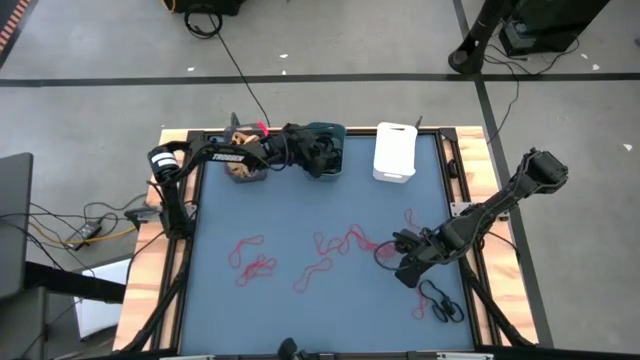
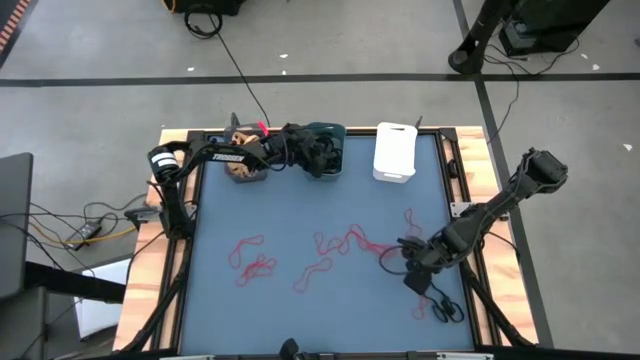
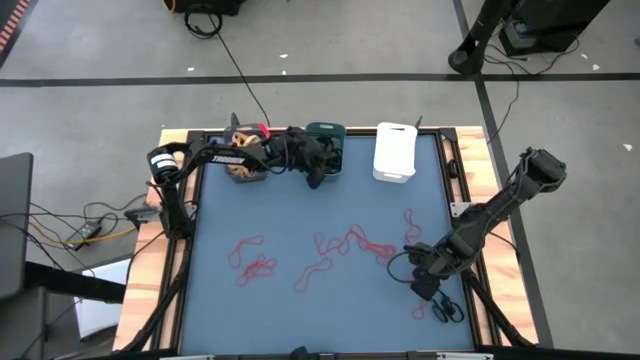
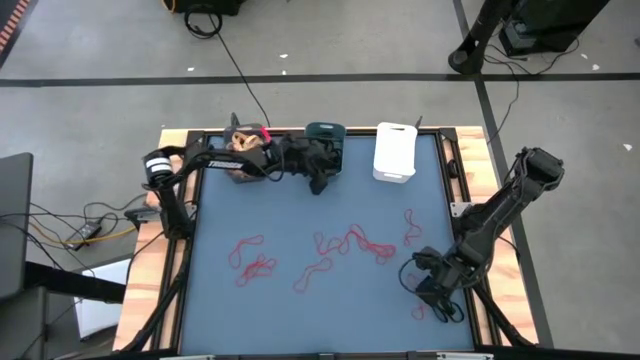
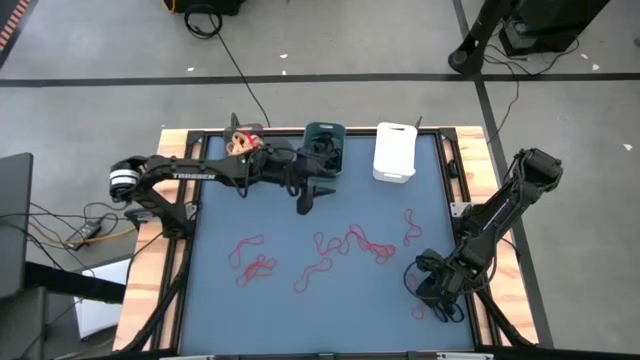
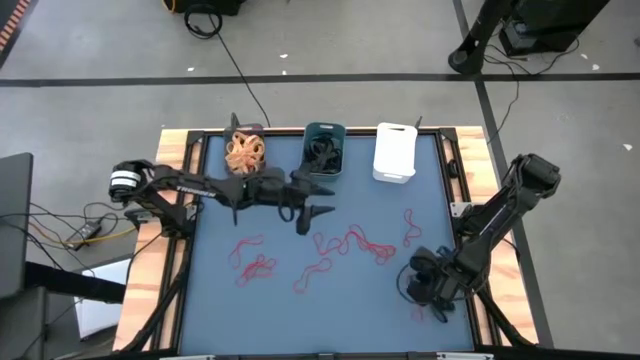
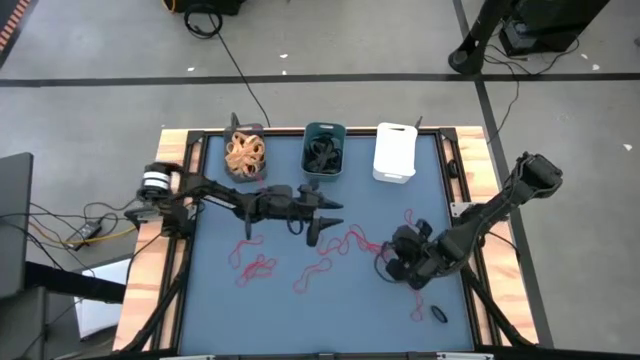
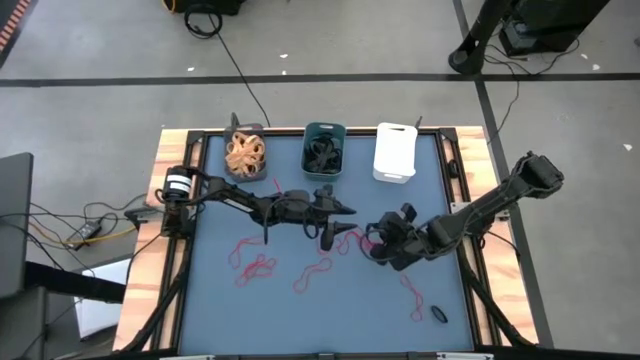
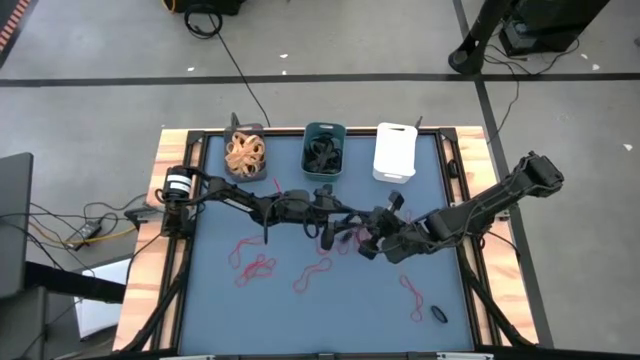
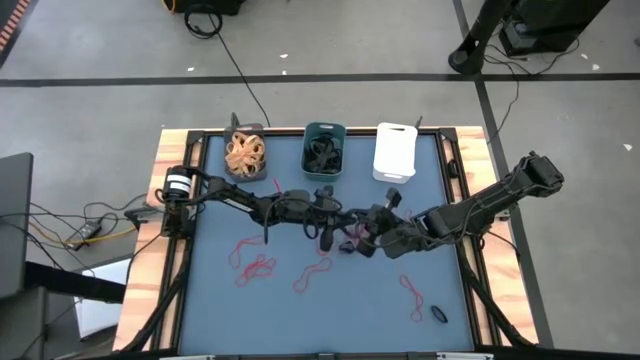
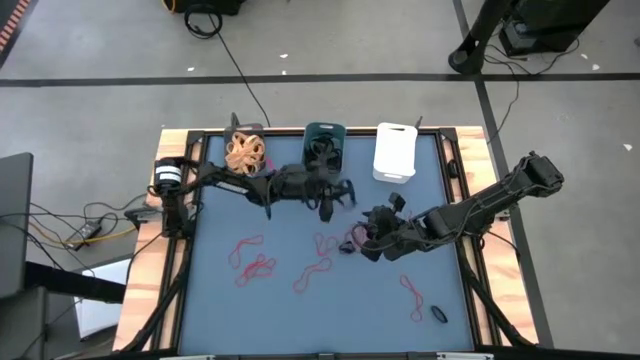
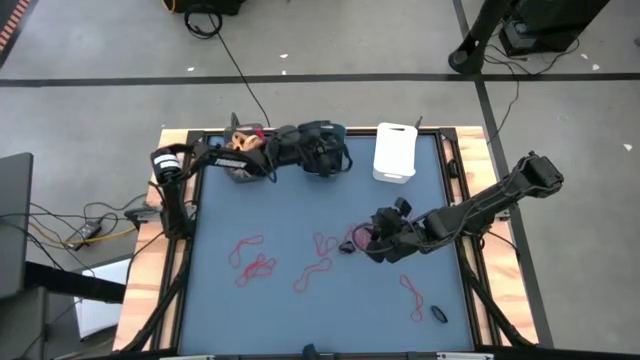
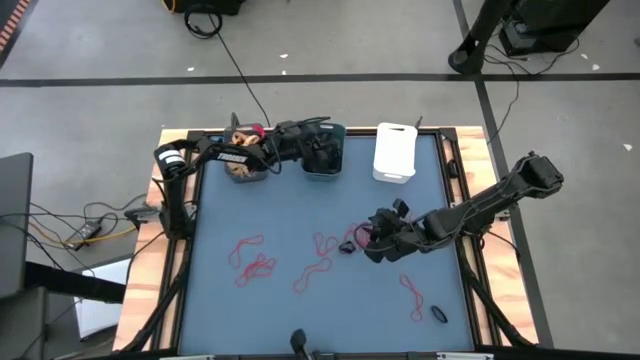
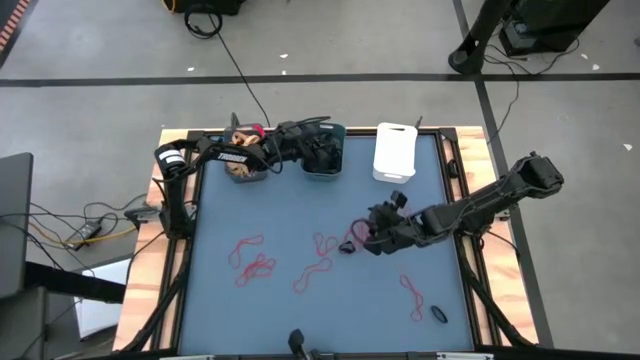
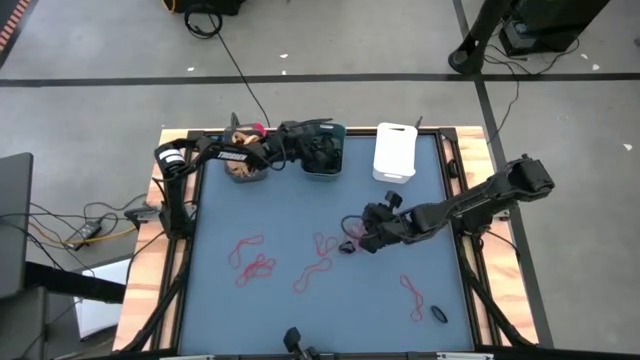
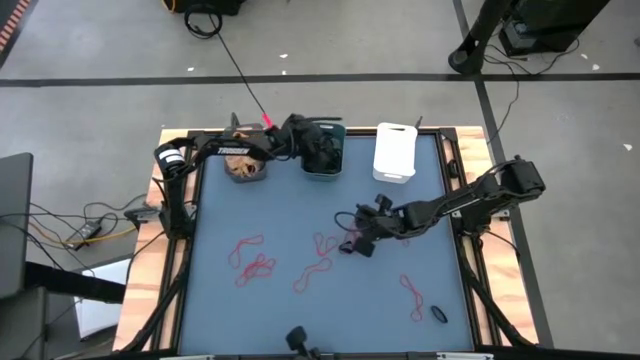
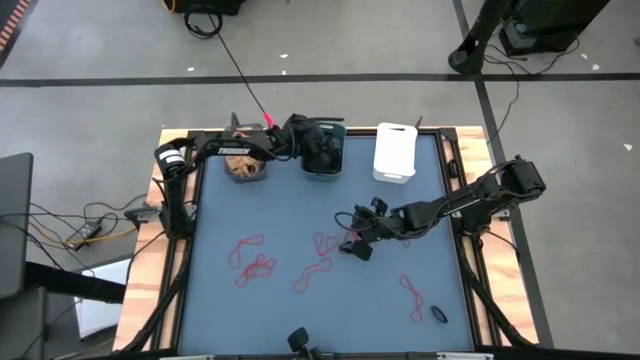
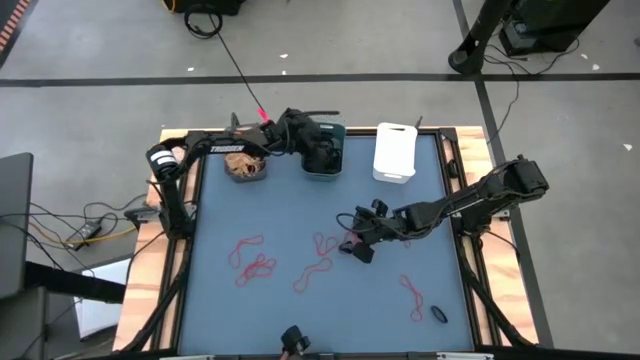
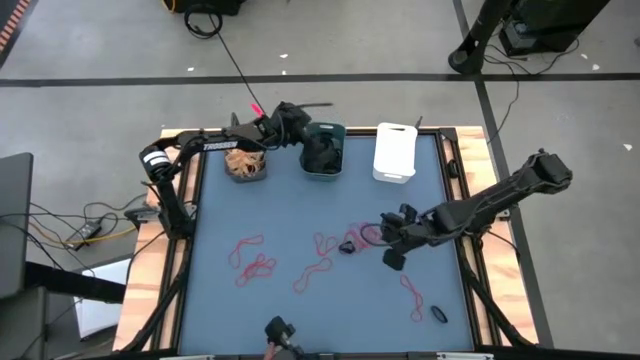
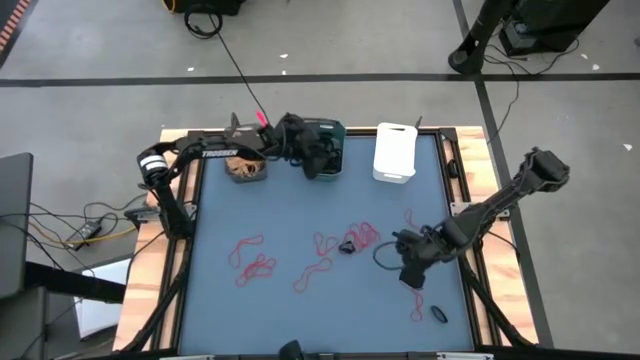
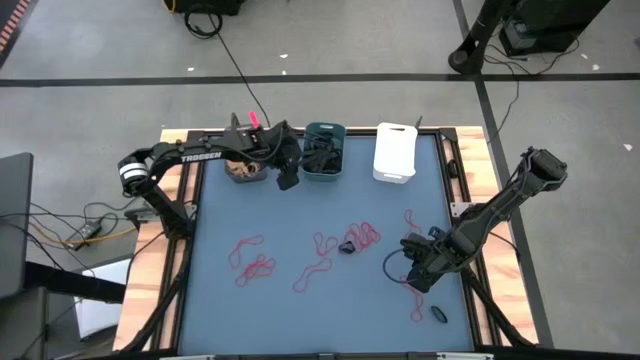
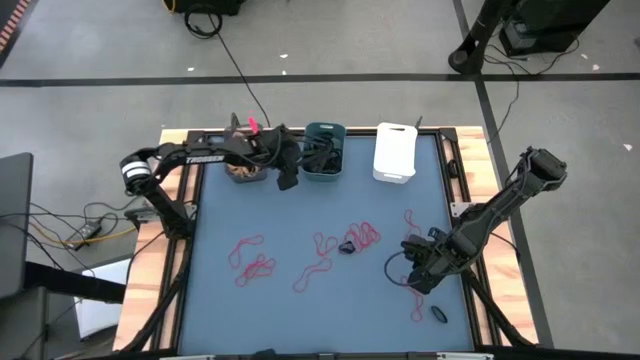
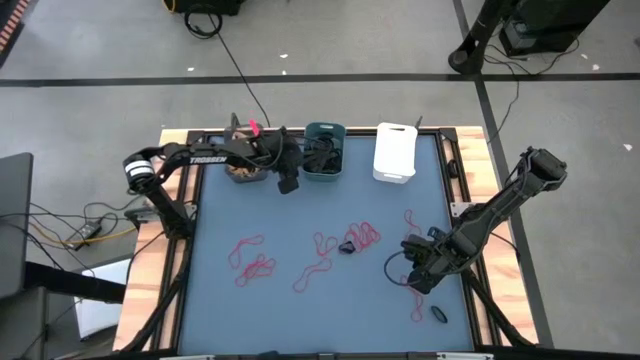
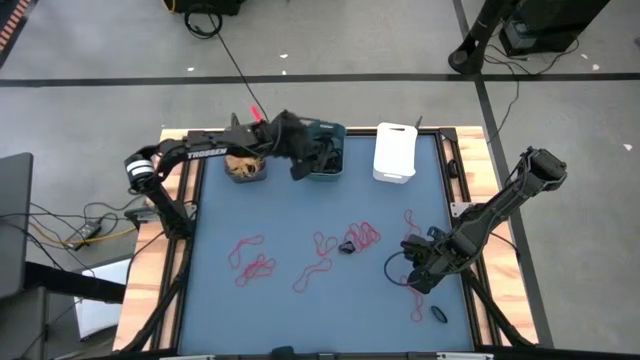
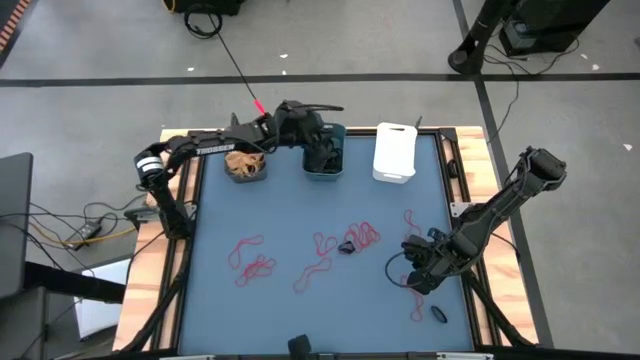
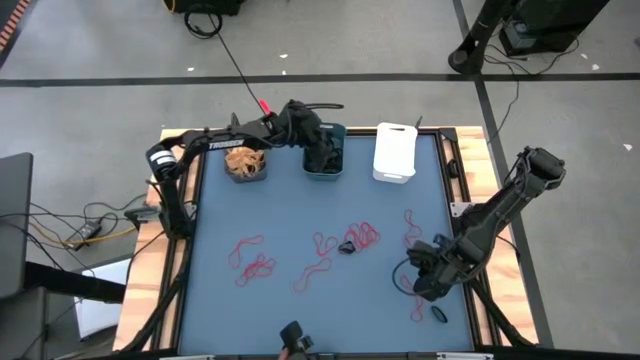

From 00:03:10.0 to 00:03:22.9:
Task: Sort rubber bands into baskets
Put the black rubber band into the blue bin

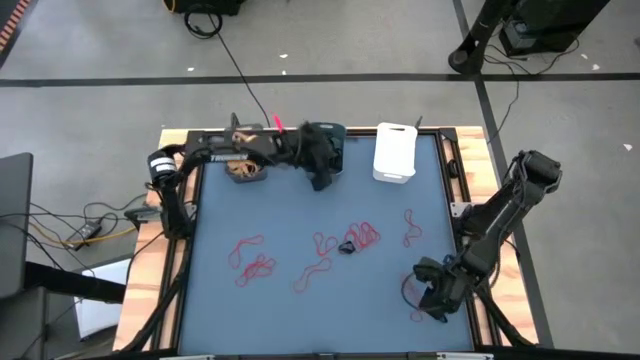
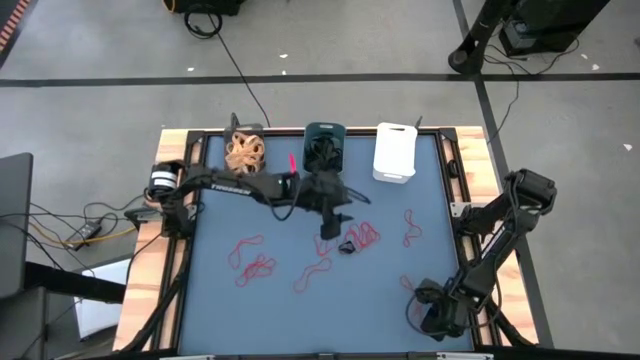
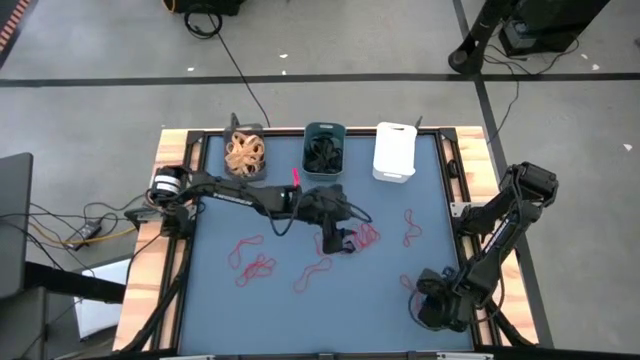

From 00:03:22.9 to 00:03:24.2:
Put the black rubber band into the blue bin

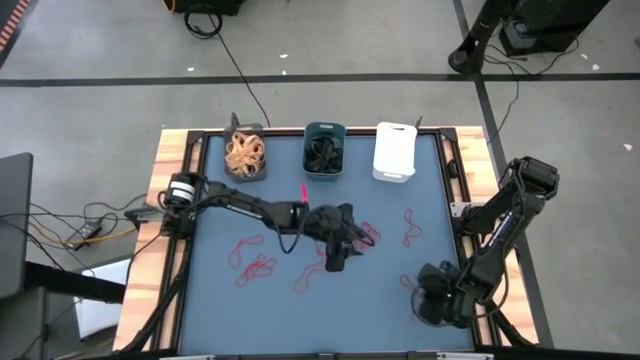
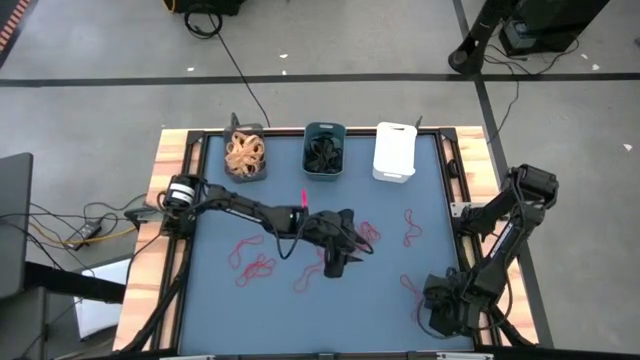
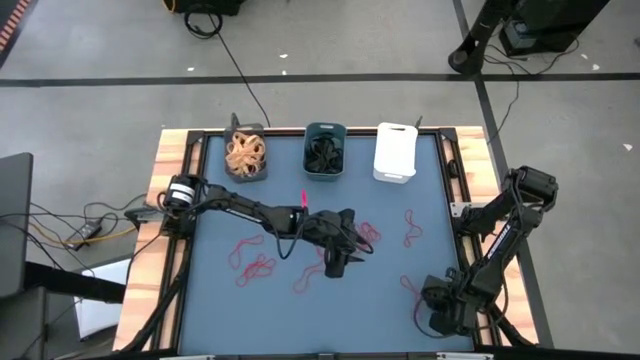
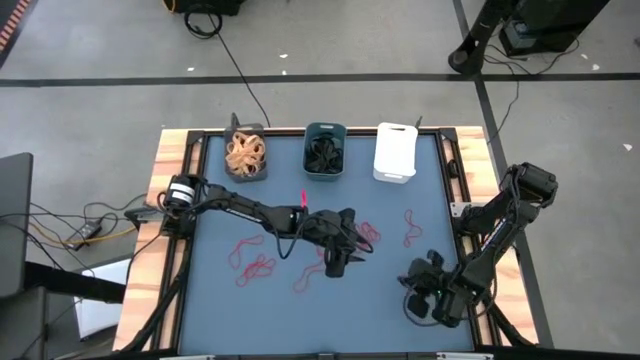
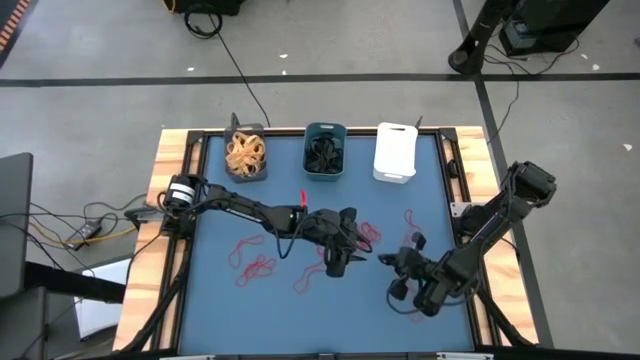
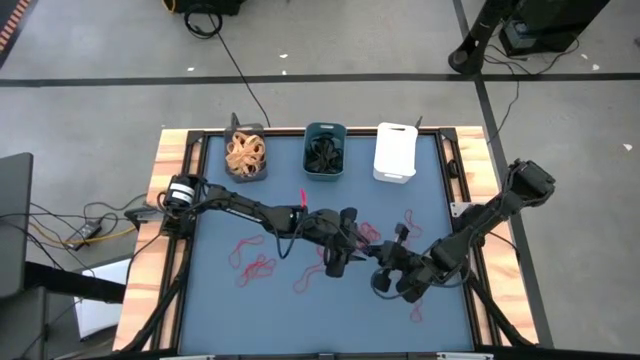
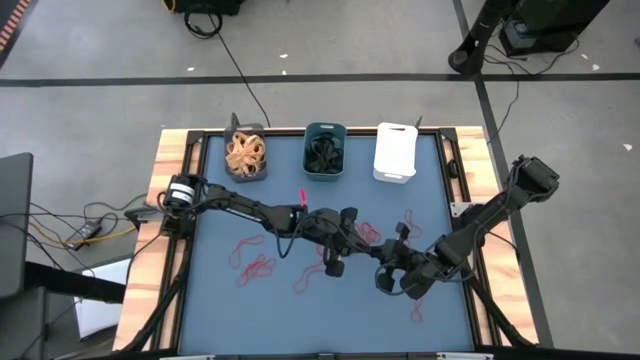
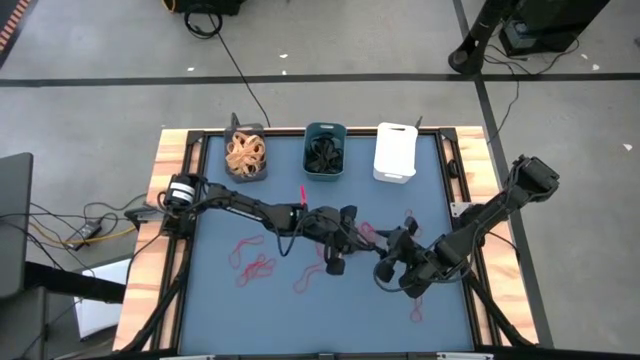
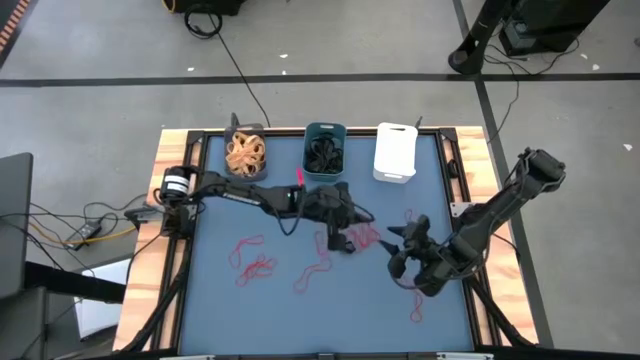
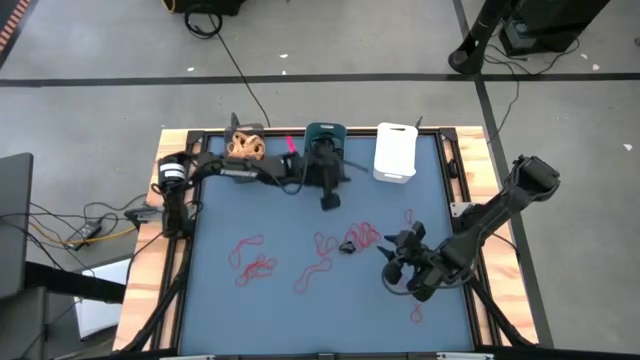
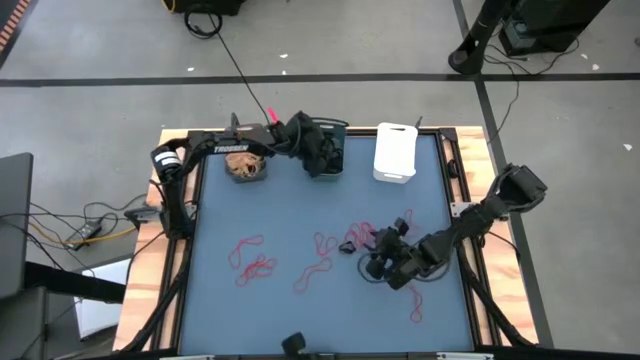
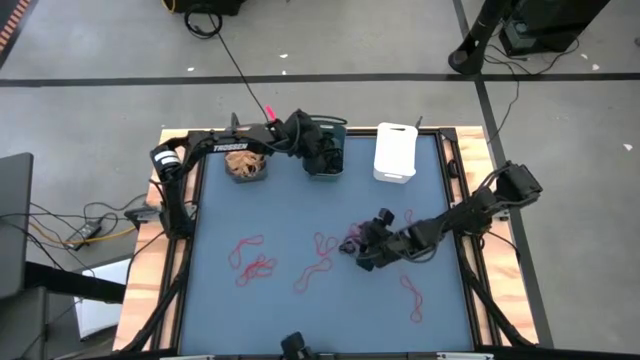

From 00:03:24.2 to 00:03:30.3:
Put the black rubber band into the blue bin
